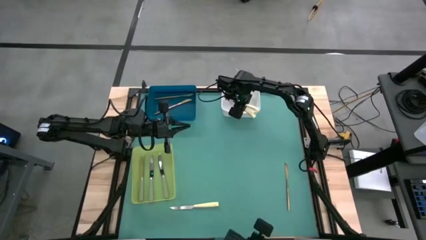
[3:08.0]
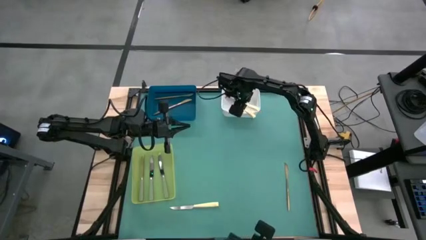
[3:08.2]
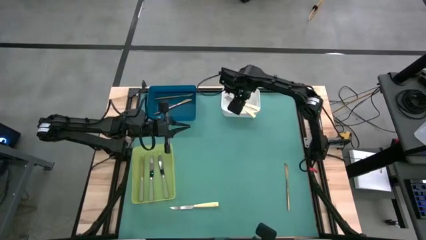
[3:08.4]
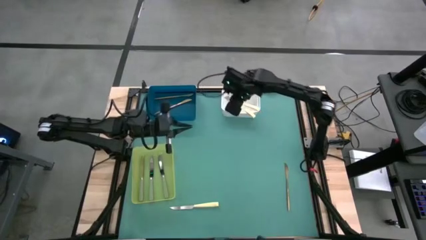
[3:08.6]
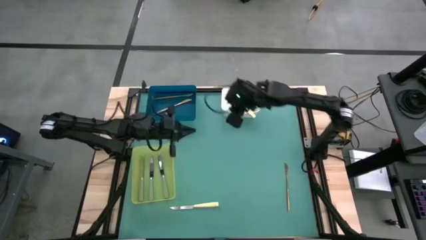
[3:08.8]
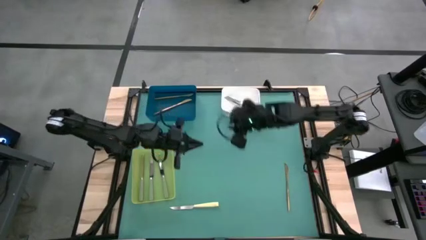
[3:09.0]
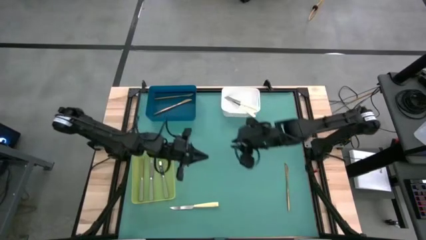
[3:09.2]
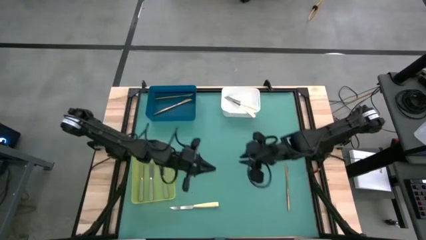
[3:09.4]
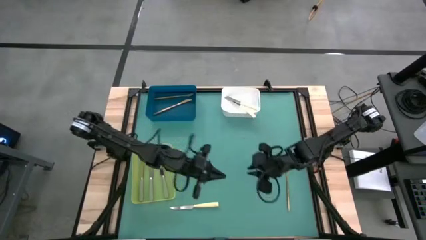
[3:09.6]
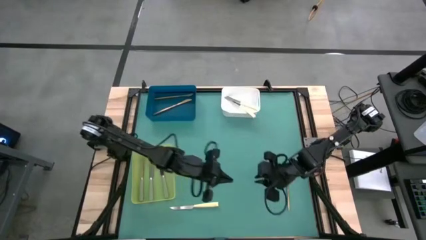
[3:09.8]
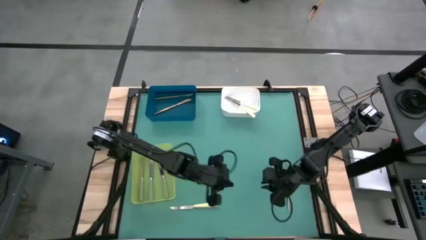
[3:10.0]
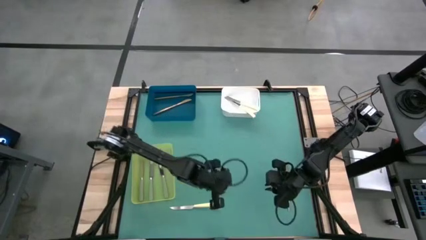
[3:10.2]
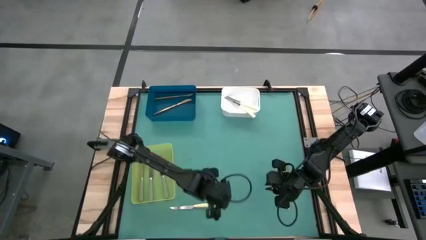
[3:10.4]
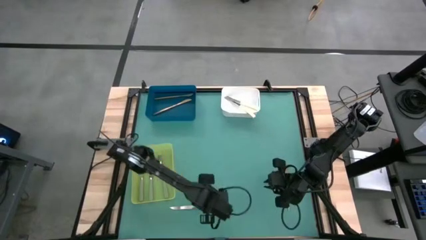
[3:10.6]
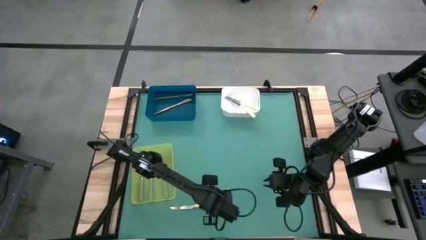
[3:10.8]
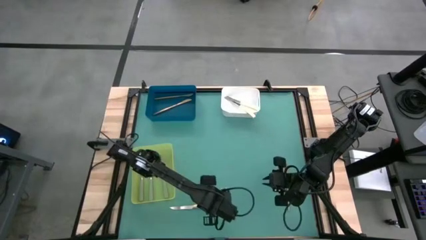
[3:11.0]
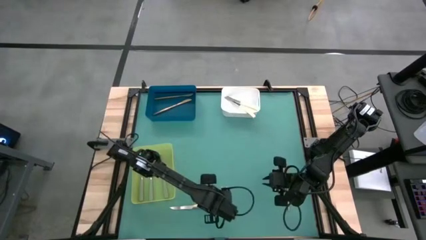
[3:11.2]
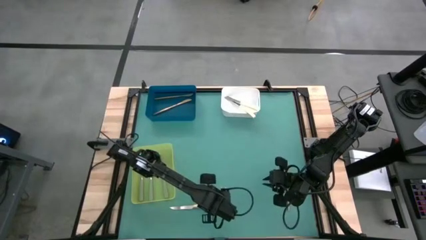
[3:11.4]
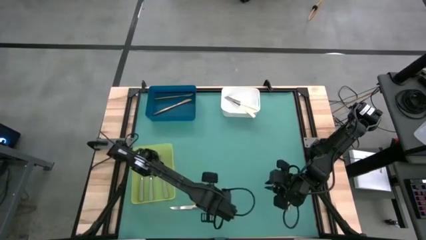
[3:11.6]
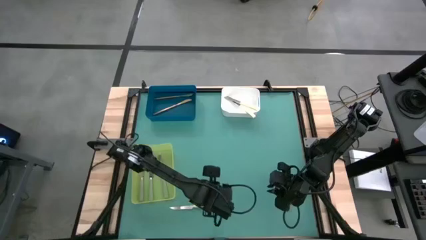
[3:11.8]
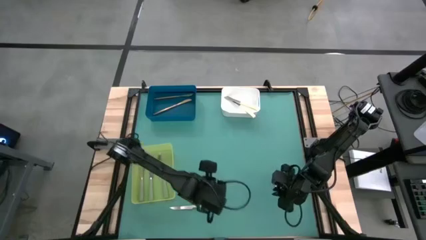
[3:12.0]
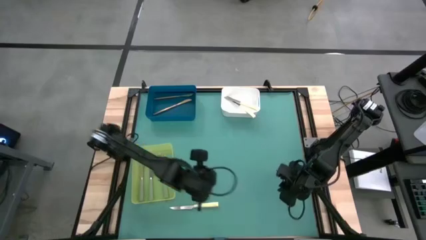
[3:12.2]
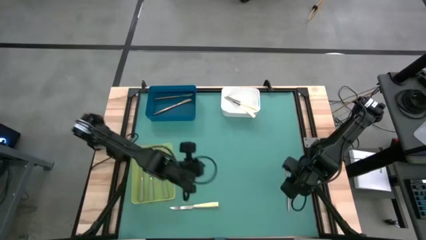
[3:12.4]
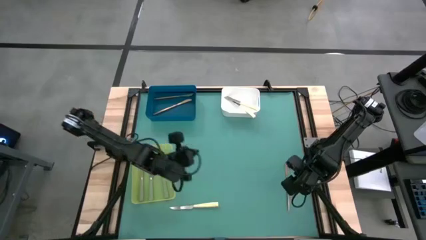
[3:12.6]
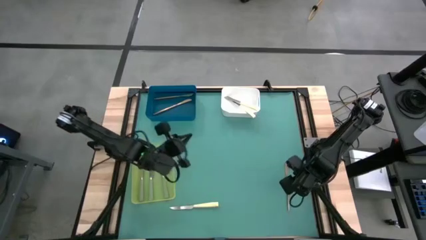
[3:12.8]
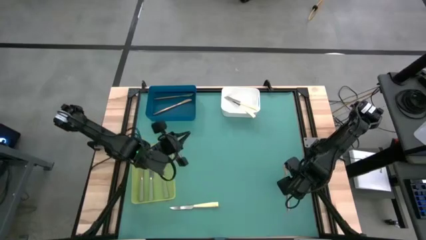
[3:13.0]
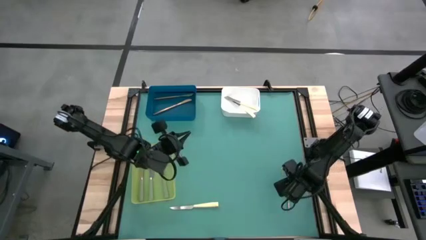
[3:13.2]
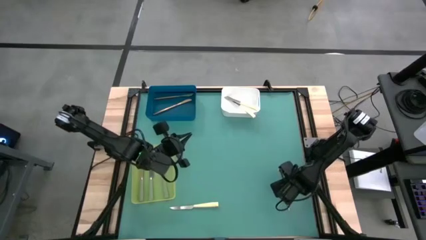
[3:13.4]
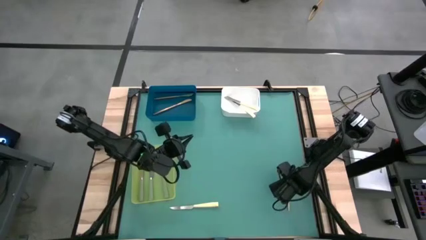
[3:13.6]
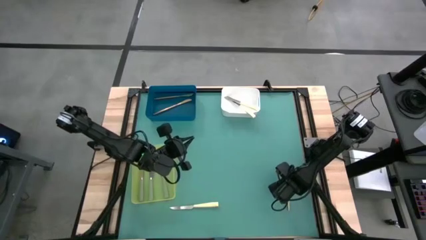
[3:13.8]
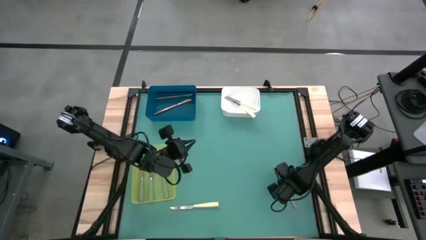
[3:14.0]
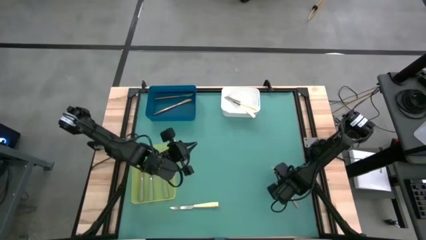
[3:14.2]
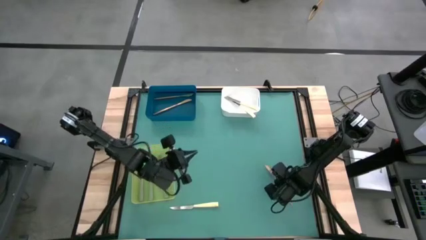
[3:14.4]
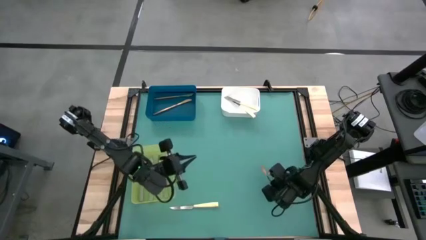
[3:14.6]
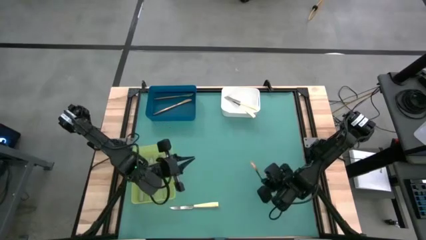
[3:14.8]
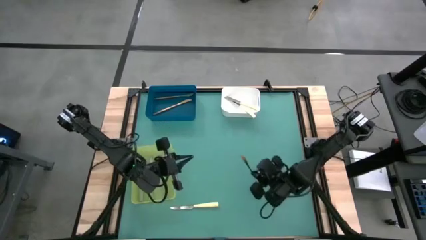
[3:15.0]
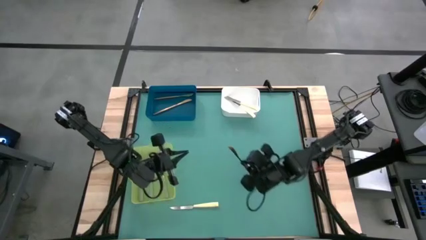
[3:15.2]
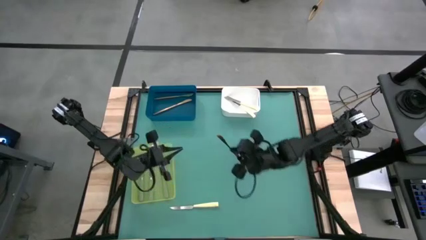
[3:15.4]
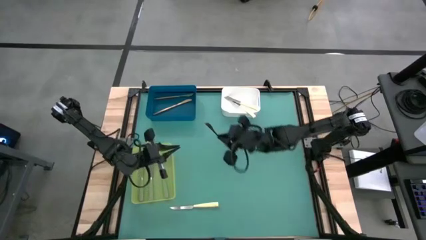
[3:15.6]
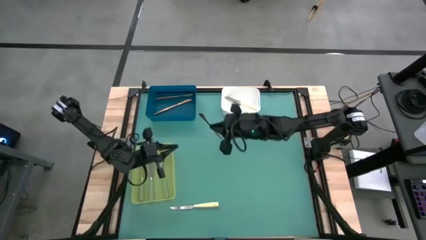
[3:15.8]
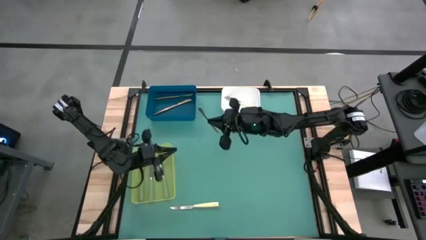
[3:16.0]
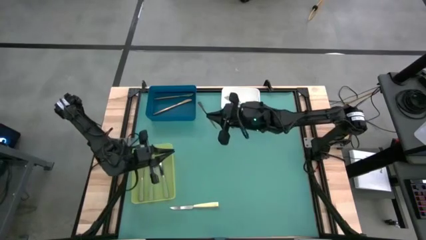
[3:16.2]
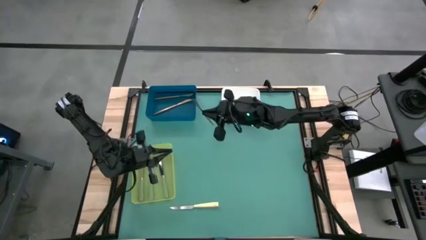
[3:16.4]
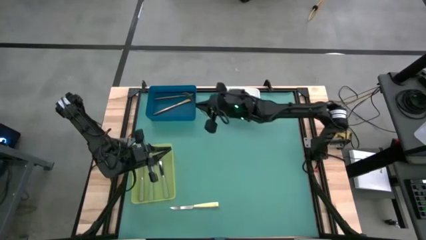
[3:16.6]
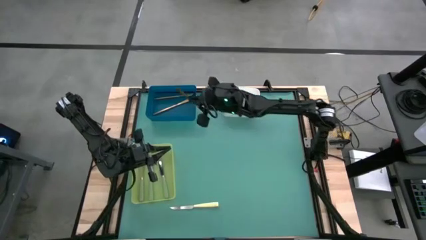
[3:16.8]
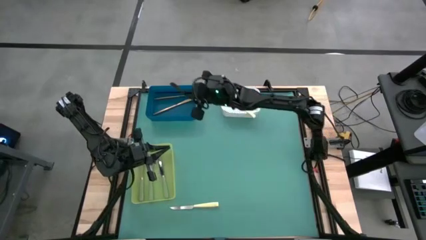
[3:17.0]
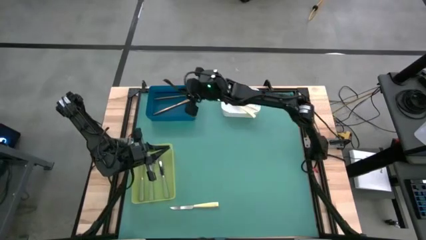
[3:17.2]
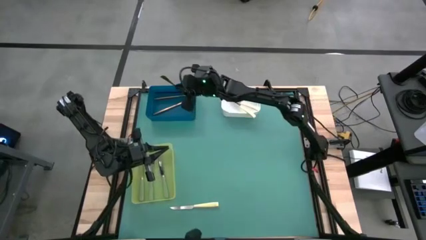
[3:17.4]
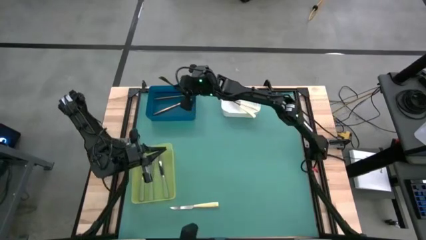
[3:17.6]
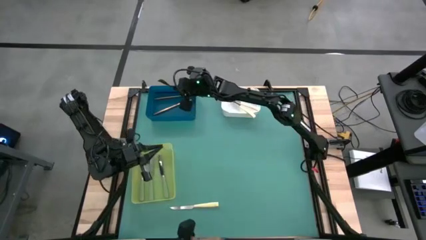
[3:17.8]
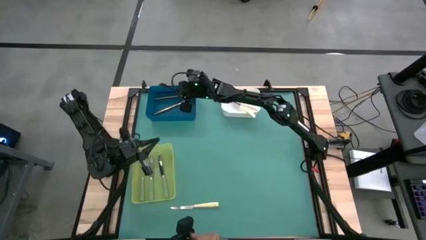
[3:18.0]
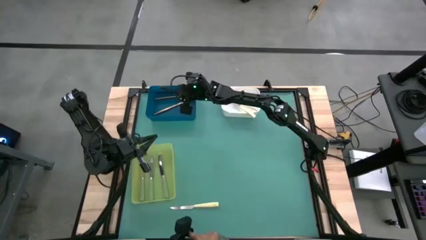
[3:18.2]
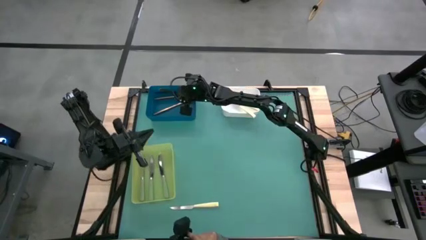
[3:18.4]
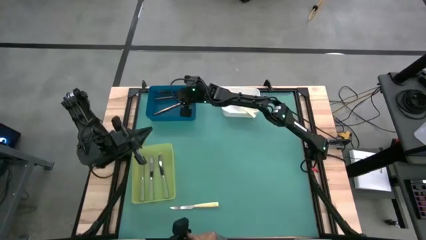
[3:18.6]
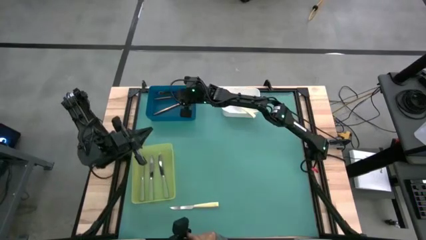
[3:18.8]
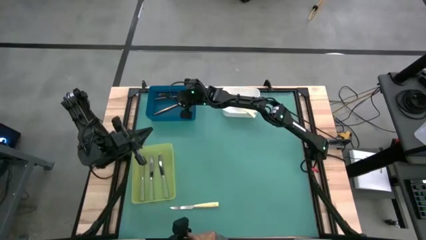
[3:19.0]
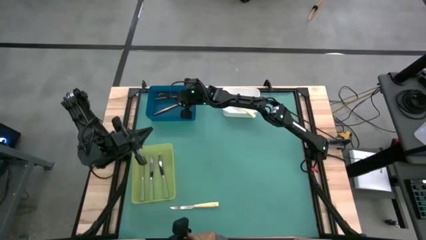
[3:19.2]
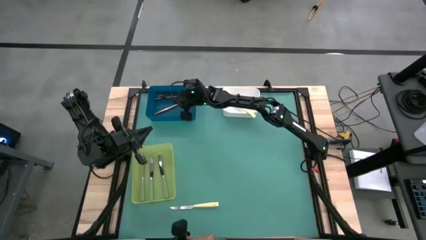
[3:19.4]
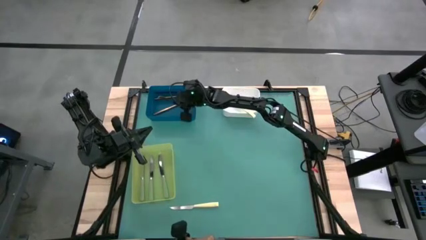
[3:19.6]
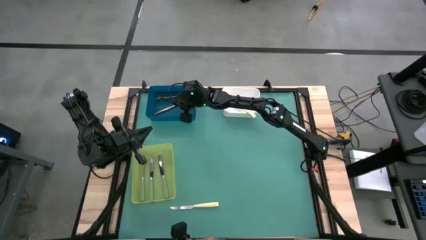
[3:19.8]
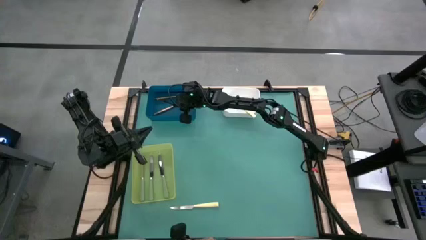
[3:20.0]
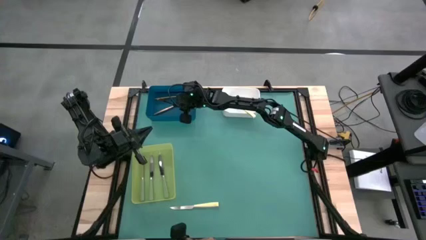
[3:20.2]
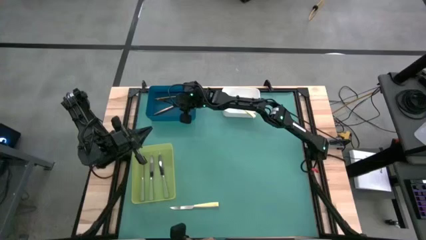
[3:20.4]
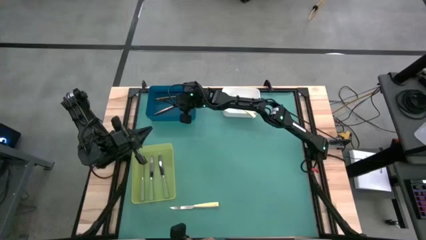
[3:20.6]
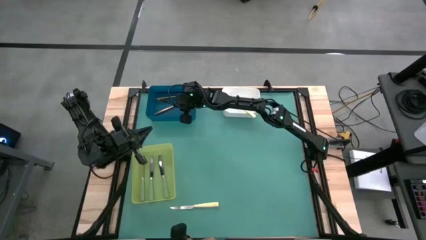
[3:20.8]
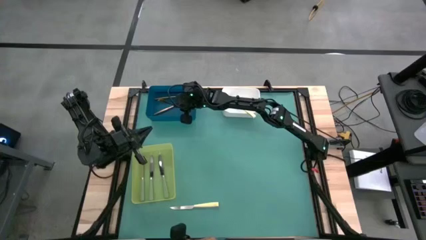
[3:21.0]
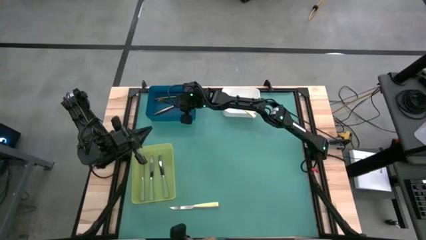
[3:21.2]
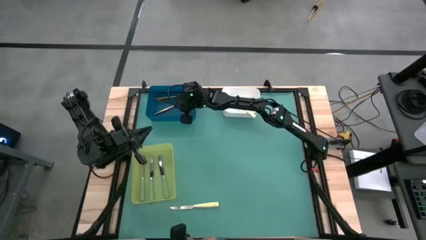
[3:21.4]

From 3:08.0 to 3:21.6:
Task: Sort silverware by color (type)
Put the gold knife into the blue bin

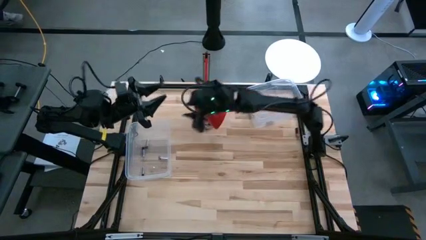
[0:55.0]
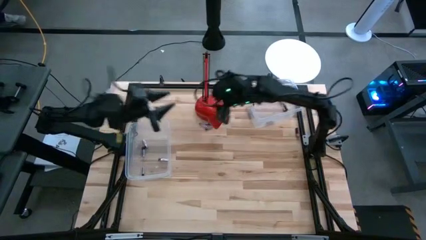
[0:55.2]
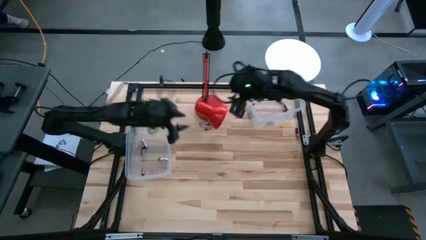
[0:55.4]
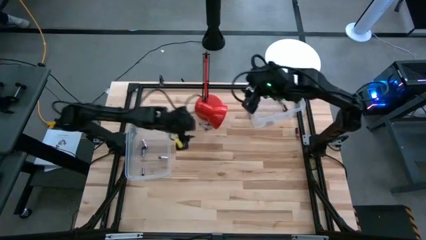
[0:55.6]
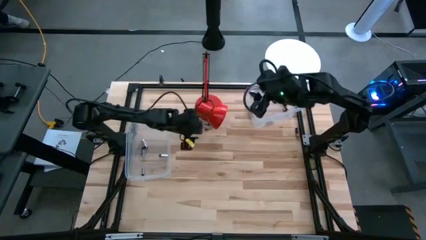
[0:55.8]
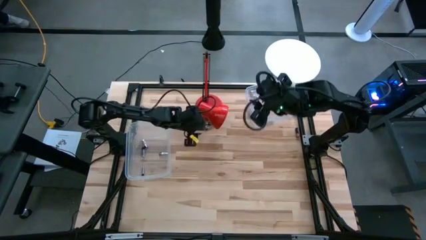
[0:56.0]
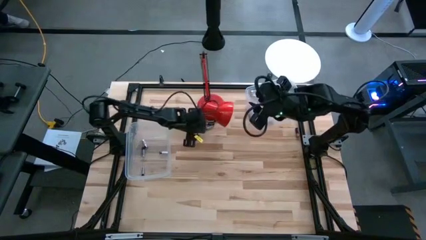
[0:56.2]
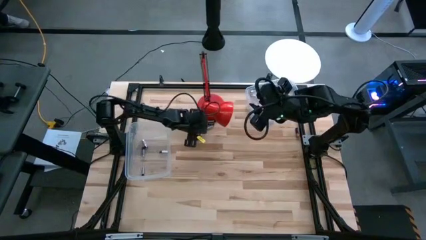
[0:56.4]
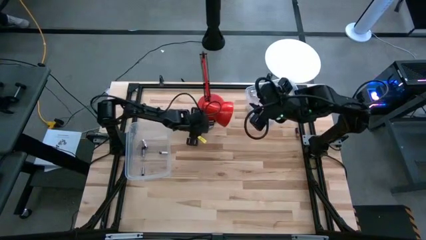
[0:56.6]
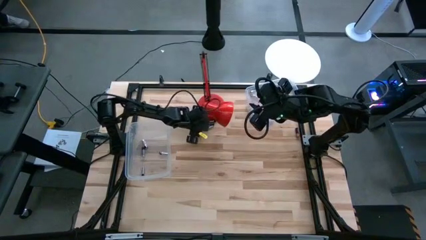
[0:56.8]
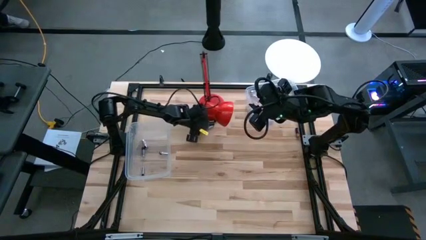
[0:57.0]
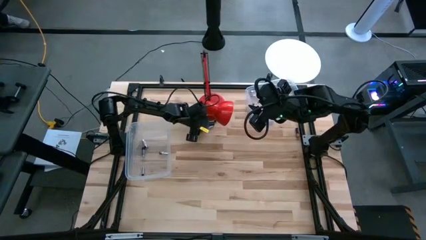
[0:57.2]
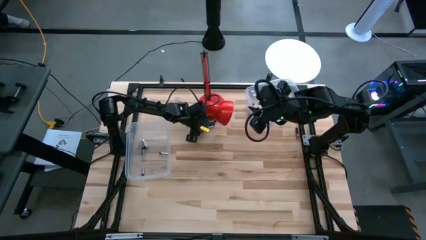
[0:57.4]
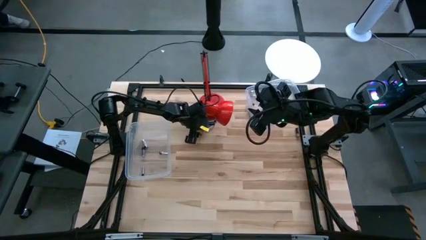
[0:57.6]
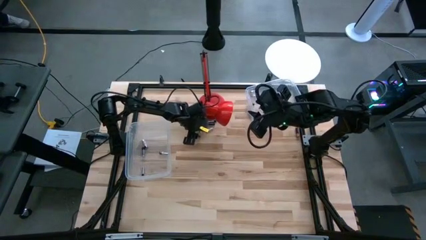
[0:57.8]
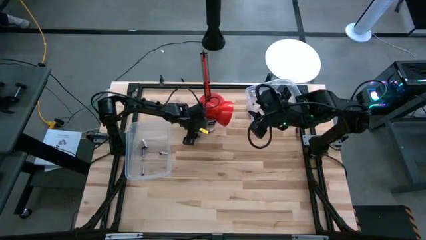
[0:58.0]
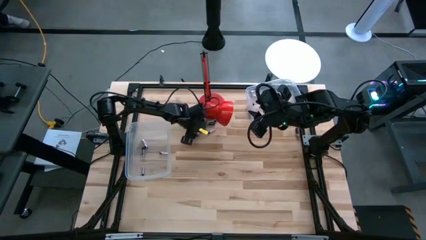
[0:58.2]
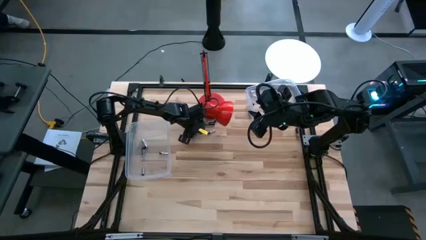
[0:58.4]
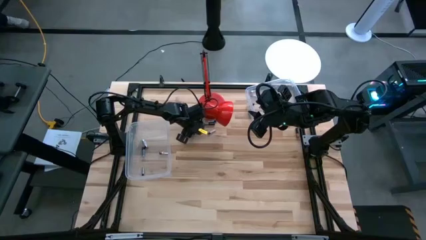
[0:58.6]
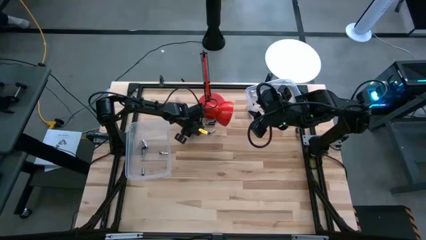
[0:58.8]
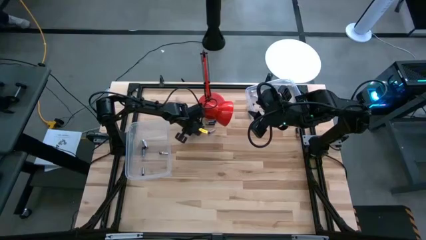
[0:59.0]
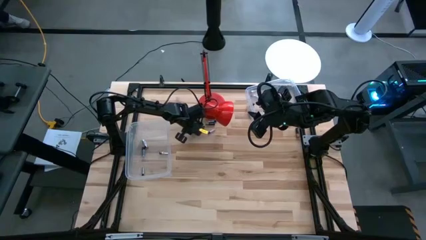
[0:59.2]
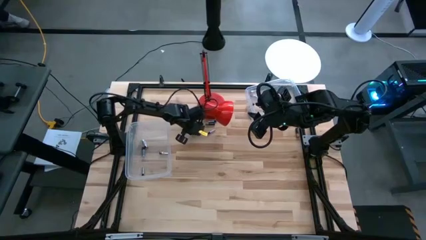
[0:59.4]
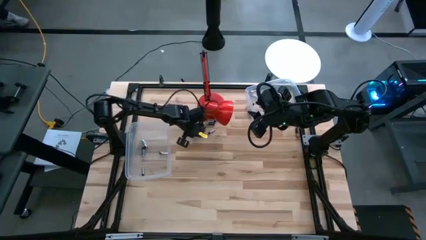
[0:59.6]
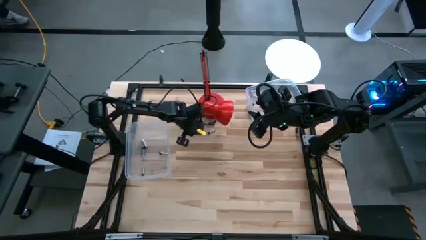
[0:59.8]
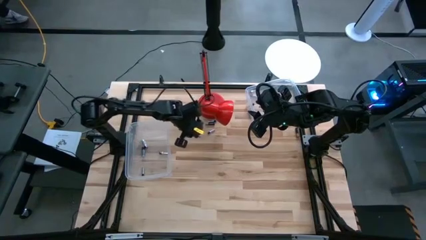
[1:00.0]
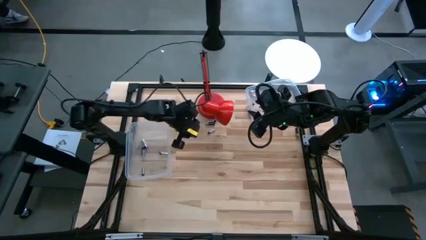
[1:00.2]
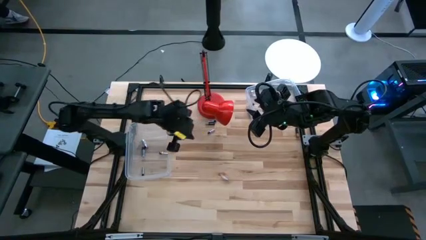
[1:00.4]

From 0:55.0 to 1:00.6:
Task: Sort batteries
Put the silver battery into the bottom transparent bin
